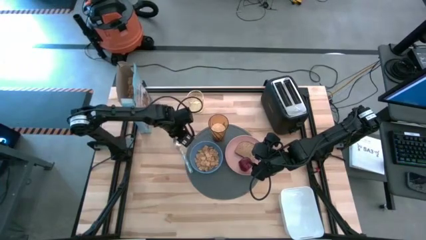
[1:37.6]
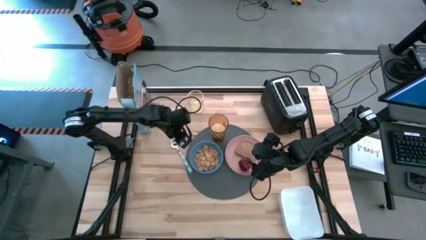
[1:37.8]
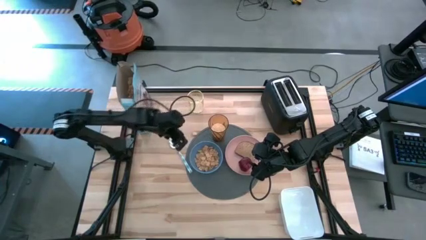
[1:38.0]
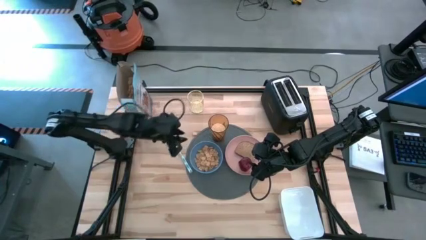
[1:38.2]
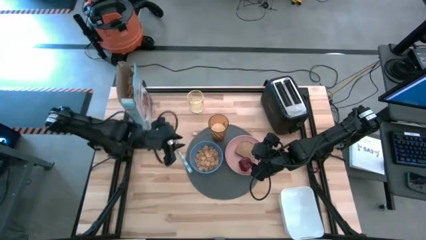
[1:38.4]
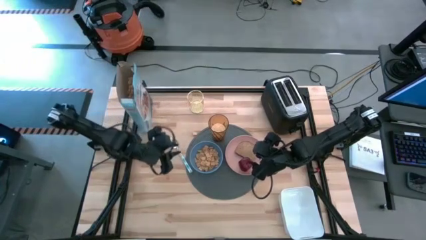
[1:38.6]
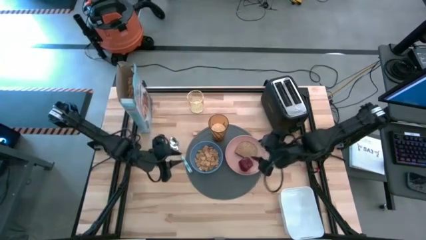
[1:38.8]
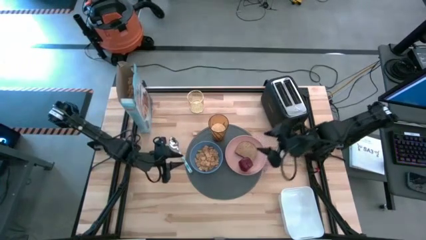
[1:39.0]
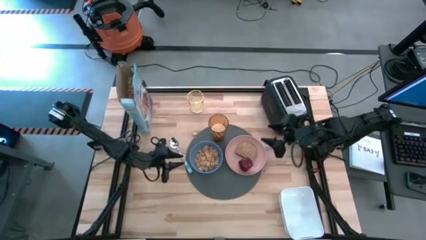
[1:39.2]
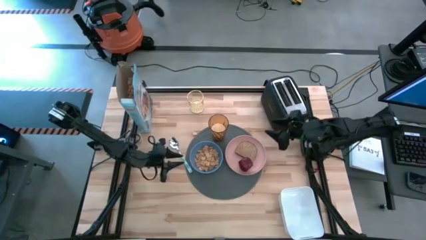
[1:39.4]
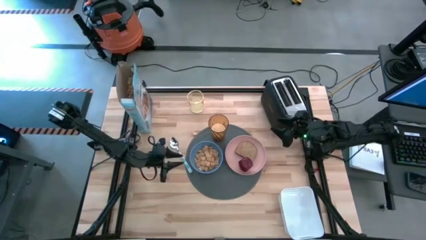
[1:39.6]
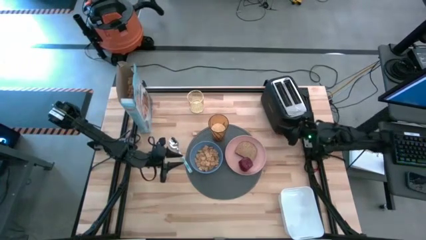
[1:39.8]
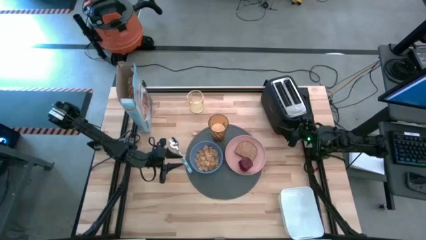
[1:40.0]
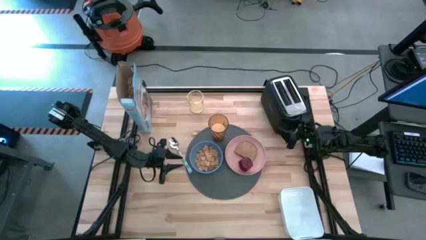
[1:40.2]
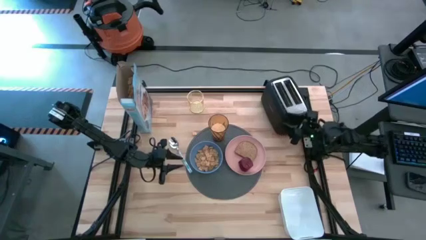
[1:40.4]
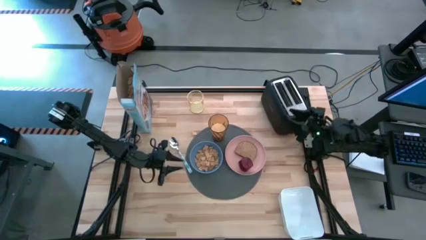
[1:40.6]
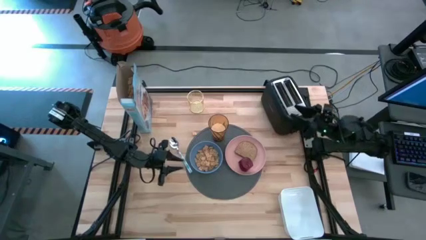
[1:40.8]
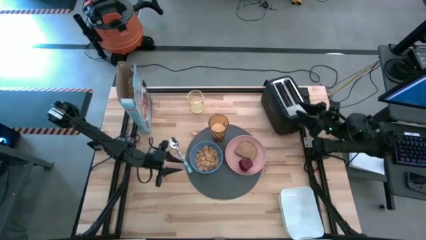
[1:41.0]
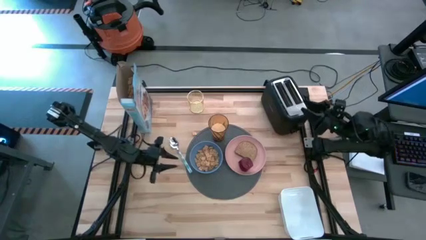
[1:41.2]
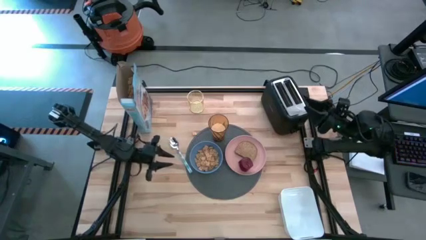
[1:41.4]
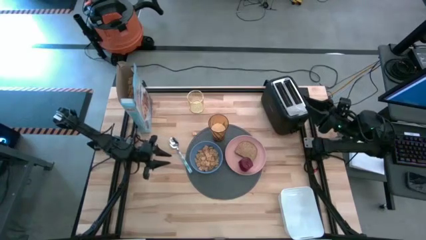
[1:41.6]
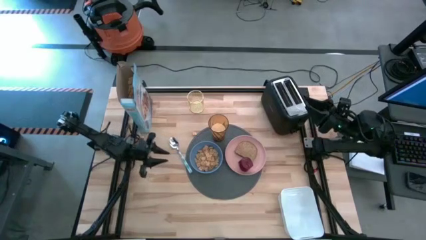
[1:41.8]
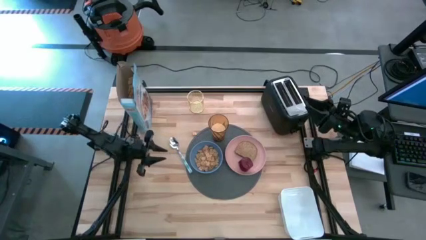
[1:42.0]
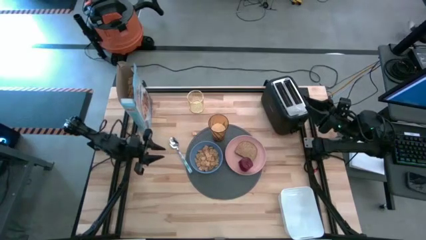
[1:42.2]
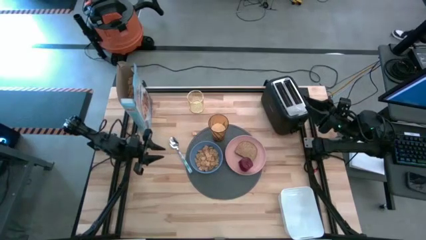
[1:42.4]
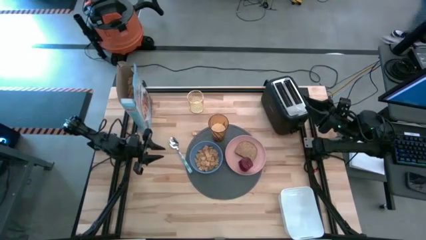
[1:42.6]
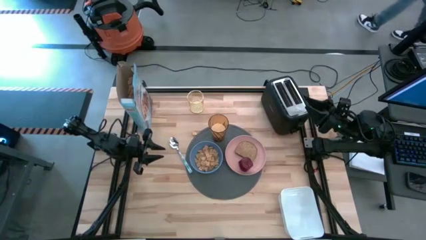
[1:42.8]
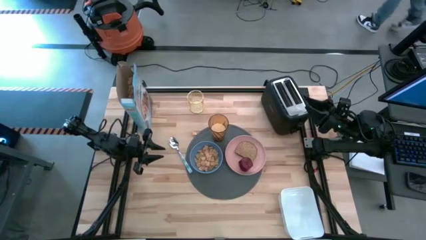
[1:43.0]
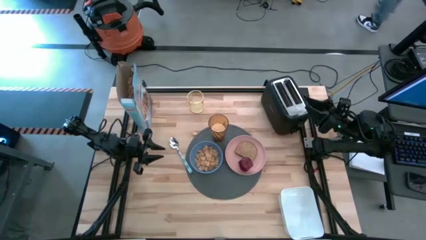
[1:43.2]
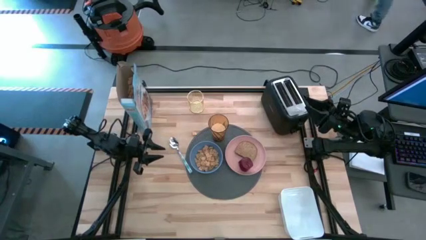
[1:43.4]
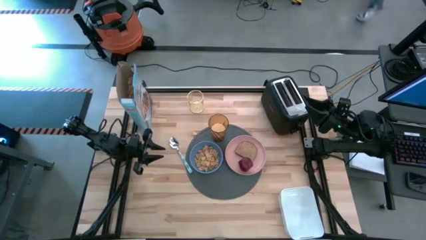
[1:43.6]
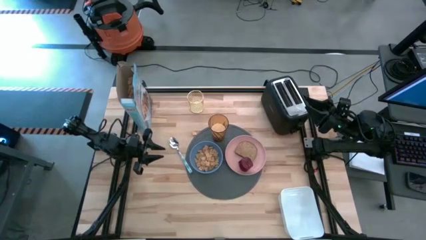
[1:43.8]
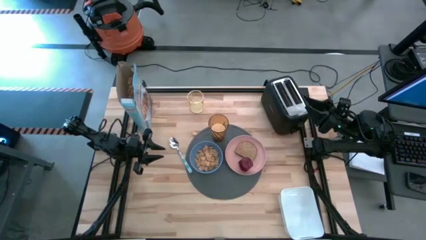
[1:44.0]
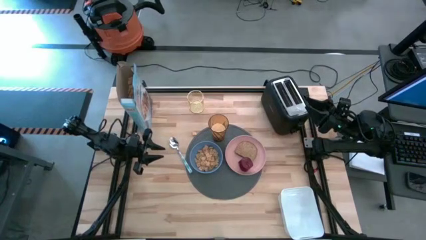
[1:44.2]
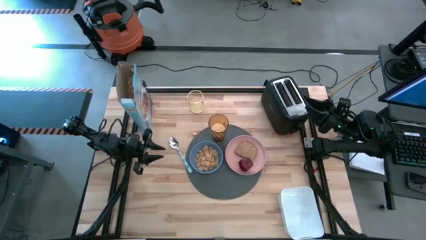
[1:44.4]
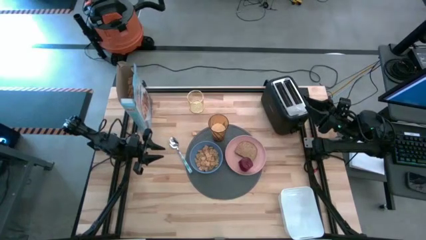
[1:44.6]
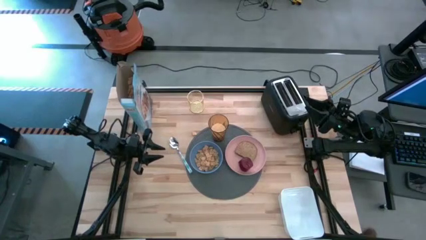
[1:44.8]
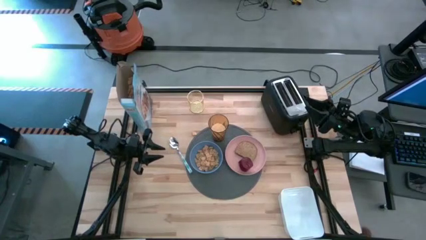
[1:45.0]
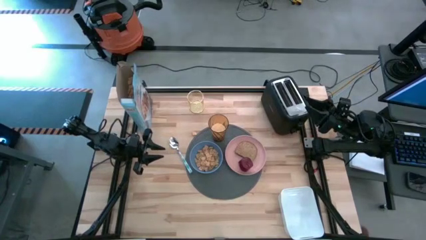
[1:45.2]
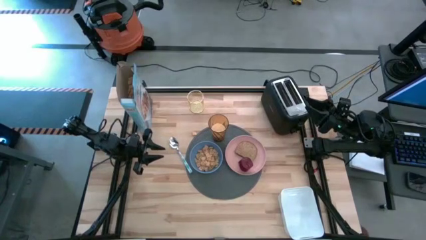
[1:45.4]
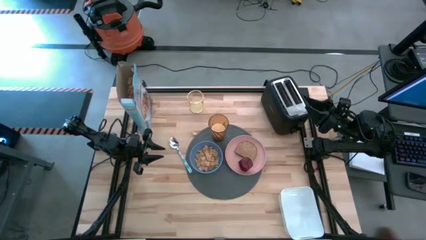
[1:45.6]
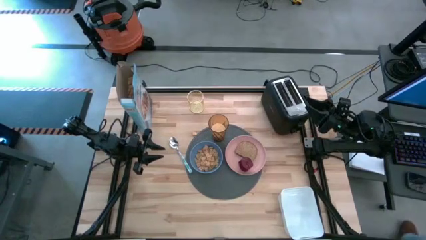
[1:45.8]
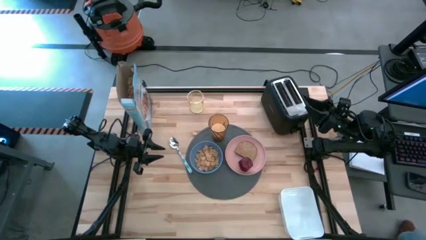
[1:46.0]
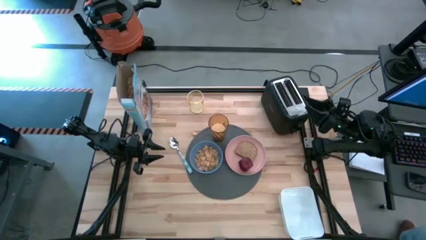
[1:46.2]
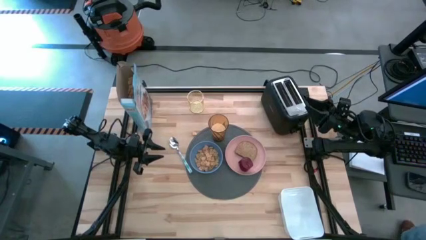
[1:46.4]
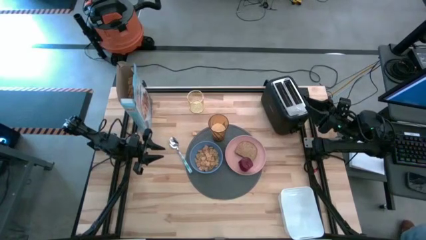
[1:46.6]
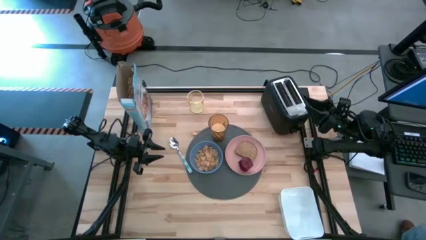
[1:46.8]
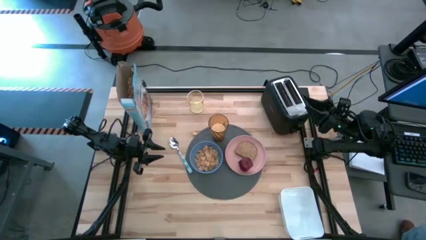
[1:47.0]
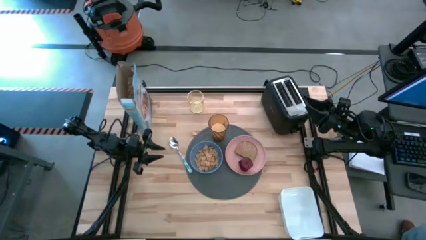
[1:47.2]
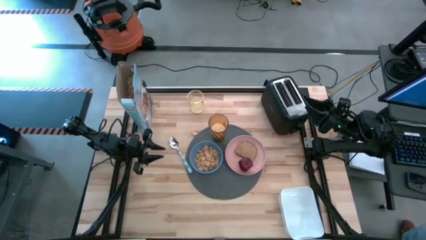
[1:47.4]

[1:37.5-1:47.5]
Task: Arrange a breakfast setting
Return to Home Position
